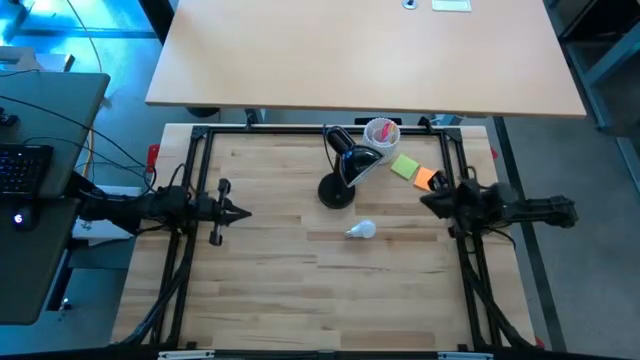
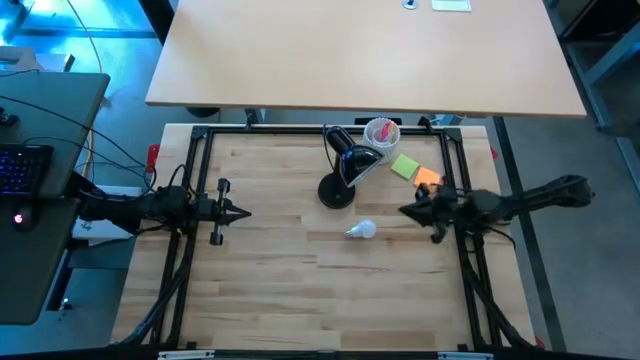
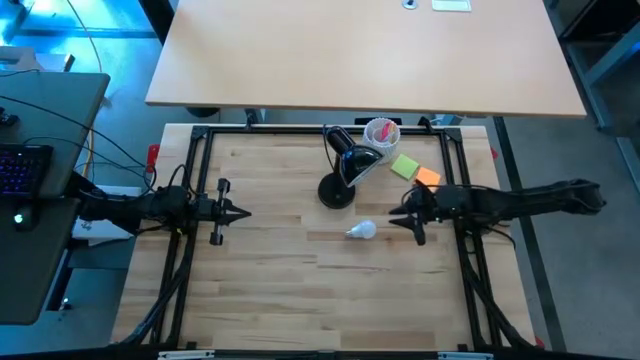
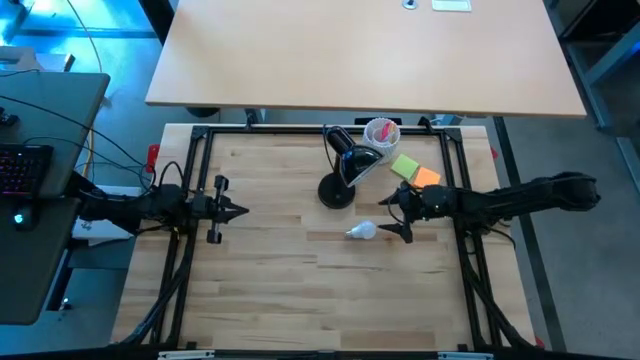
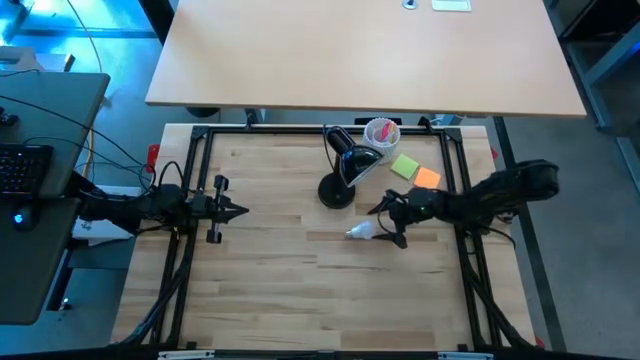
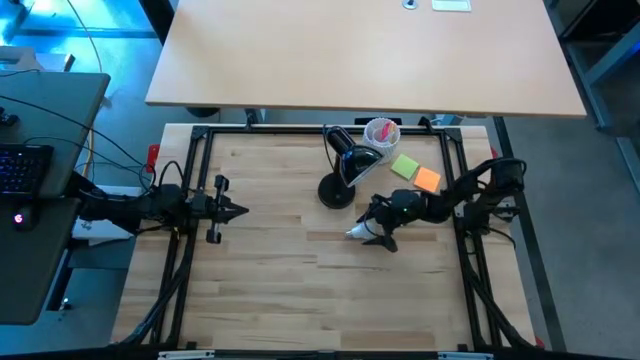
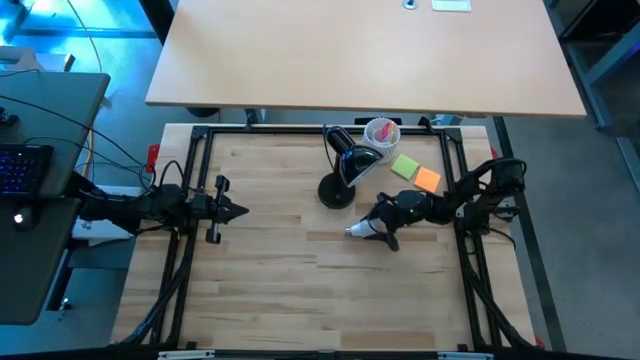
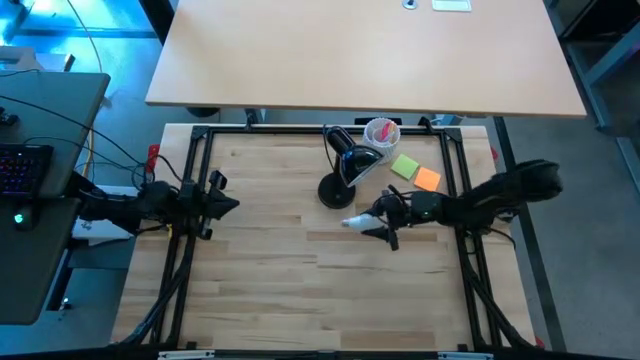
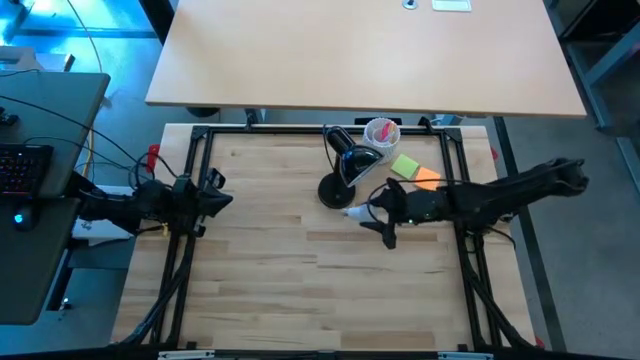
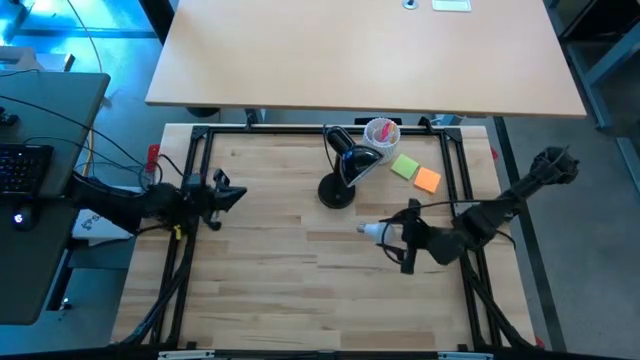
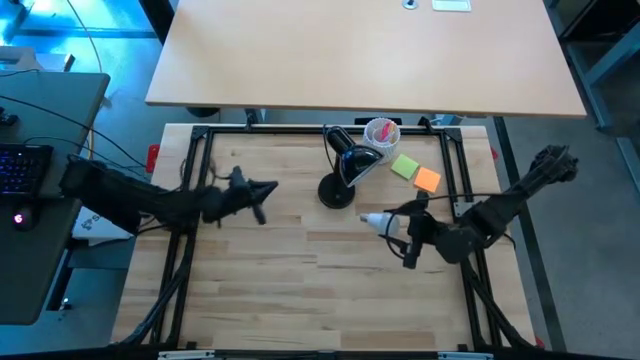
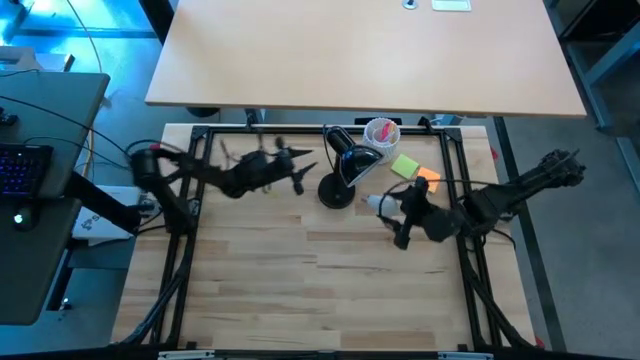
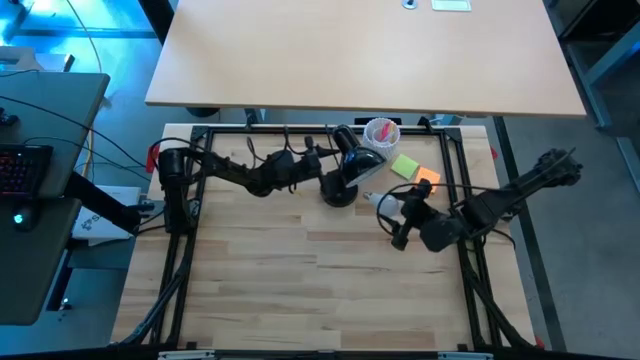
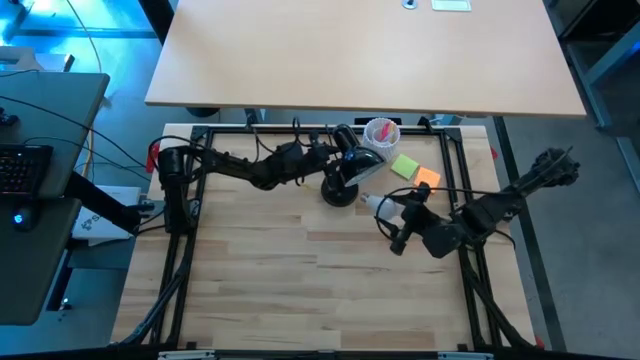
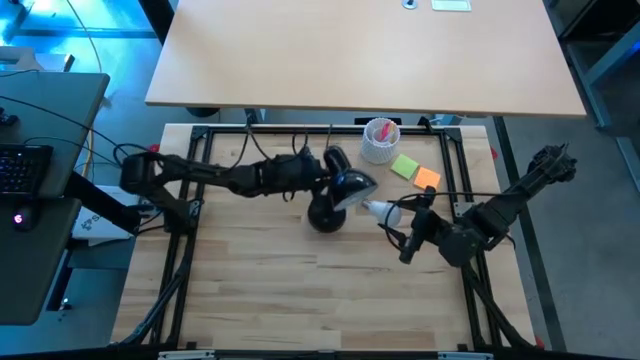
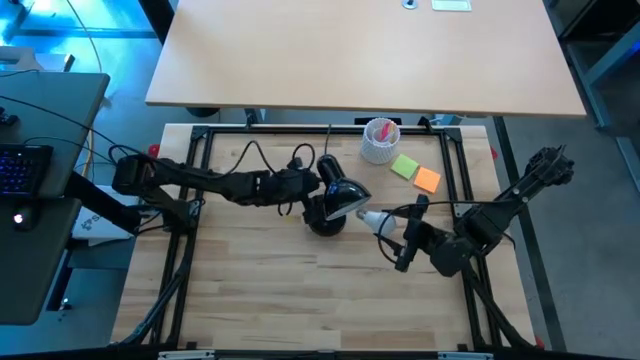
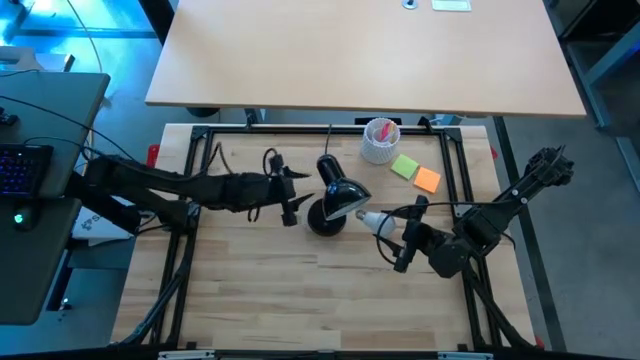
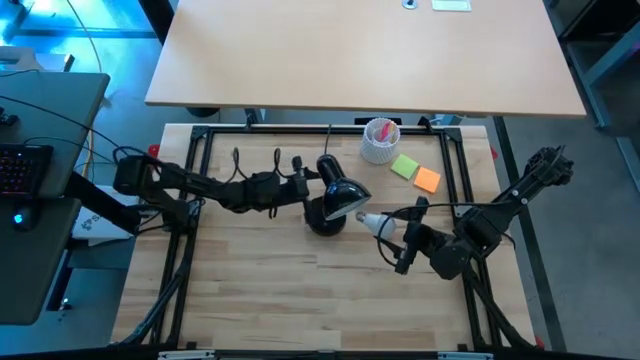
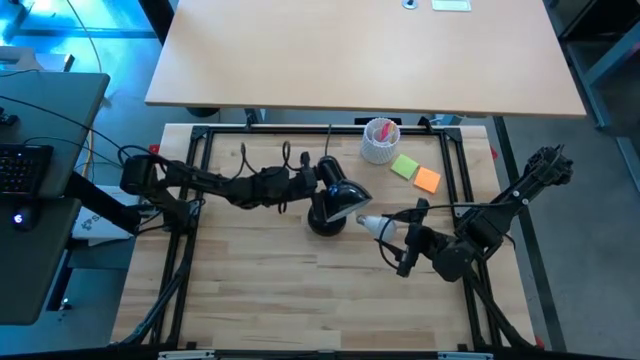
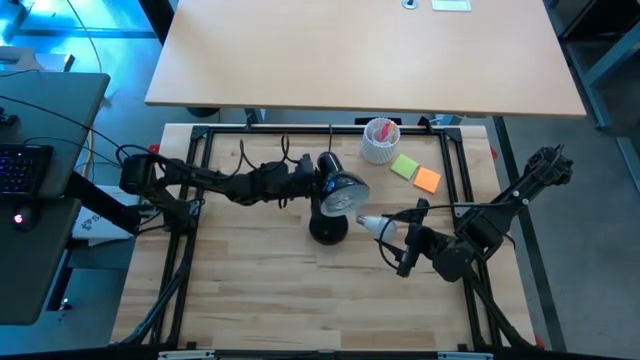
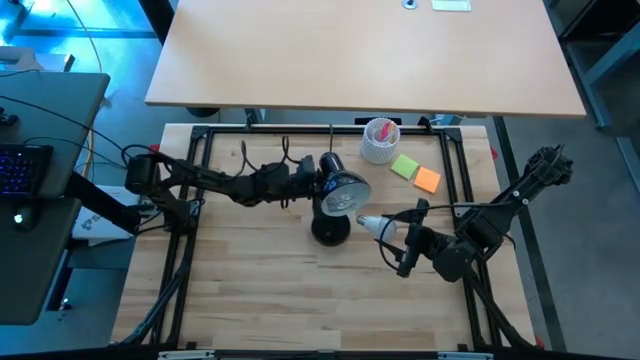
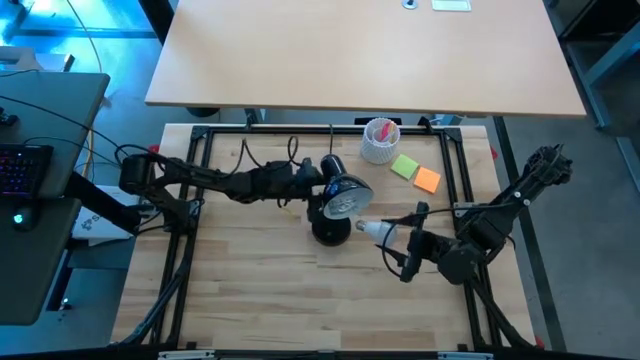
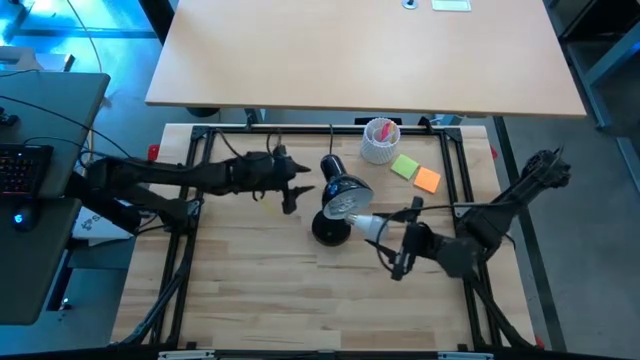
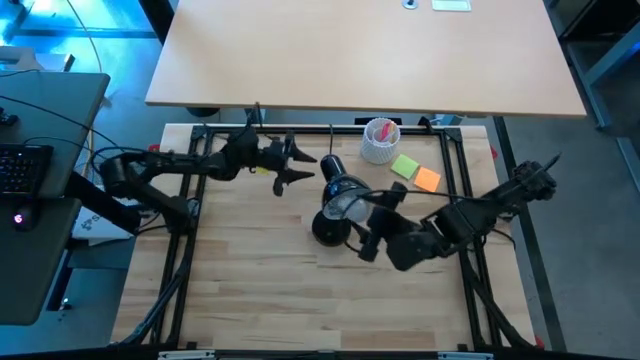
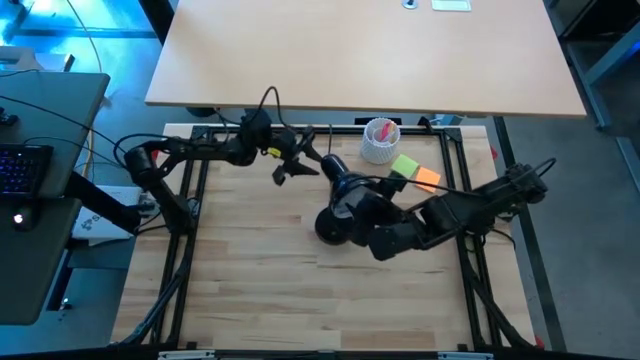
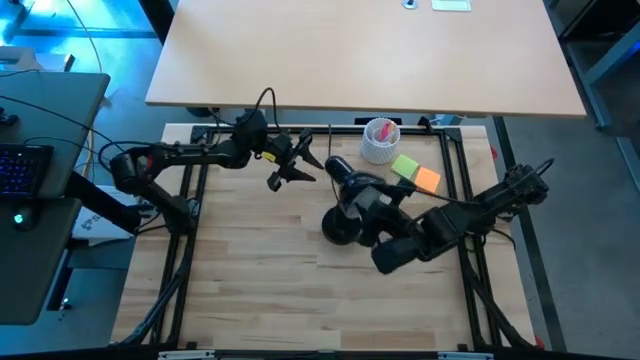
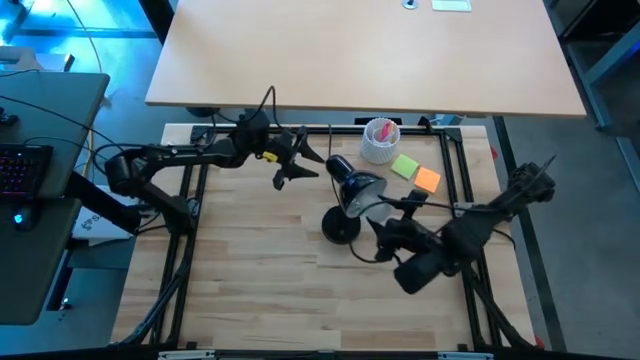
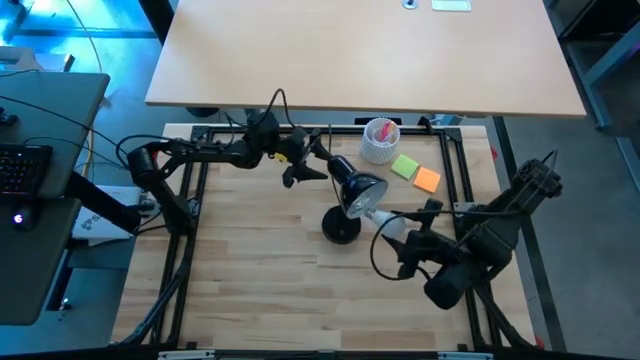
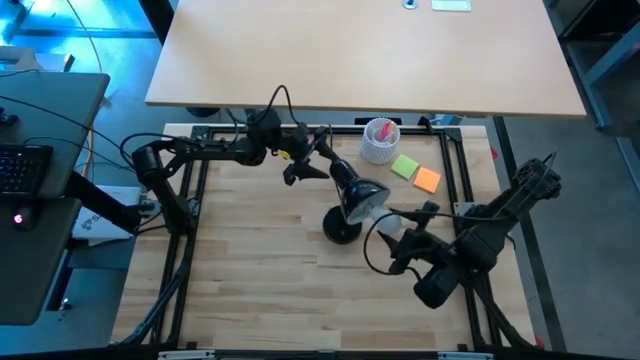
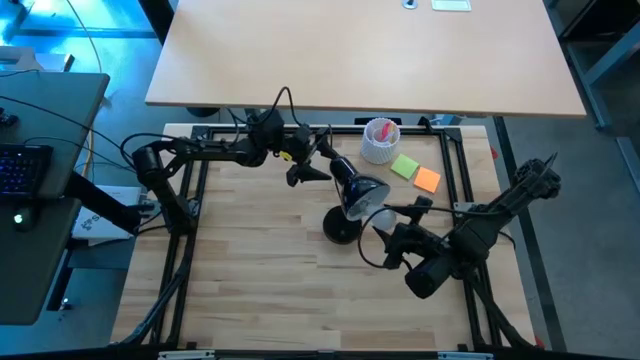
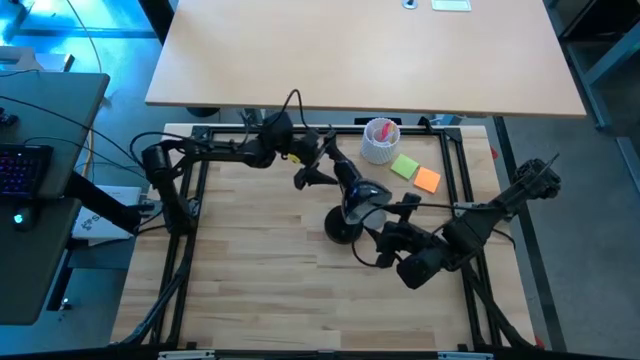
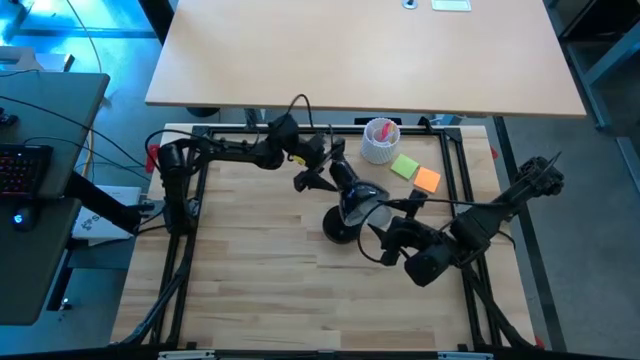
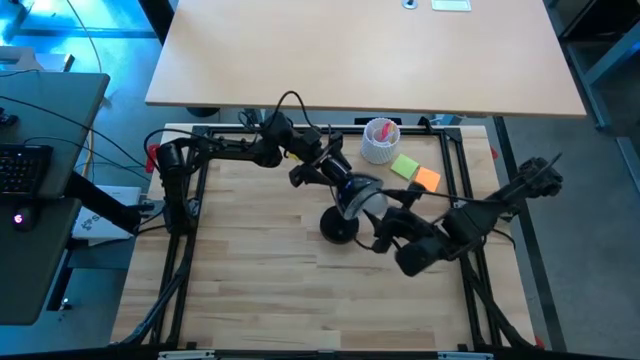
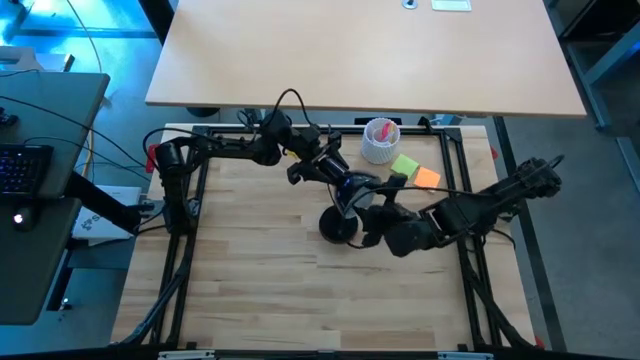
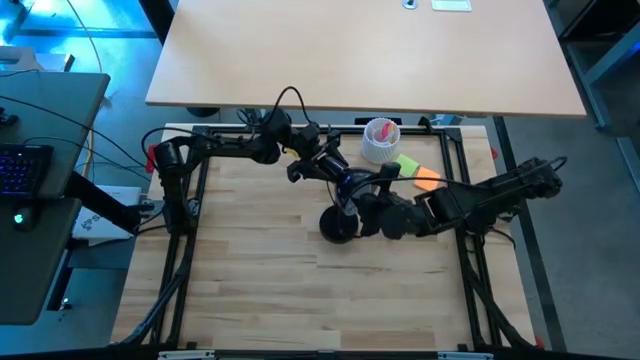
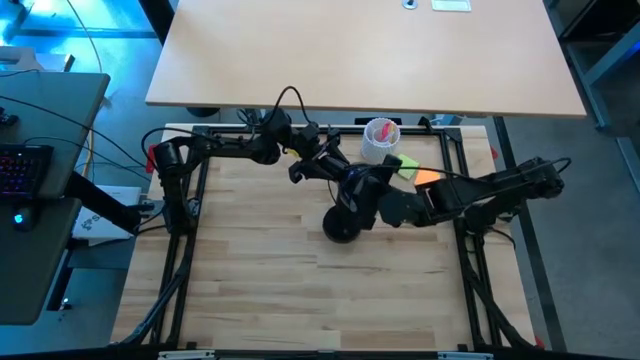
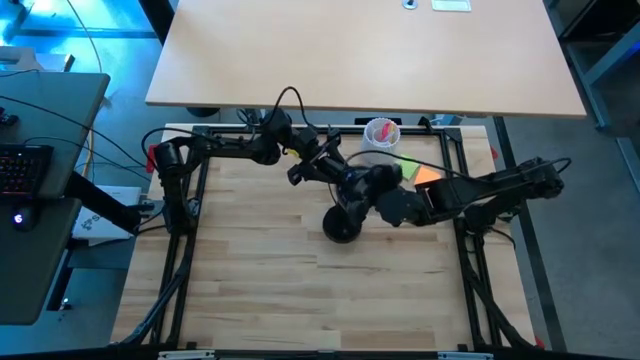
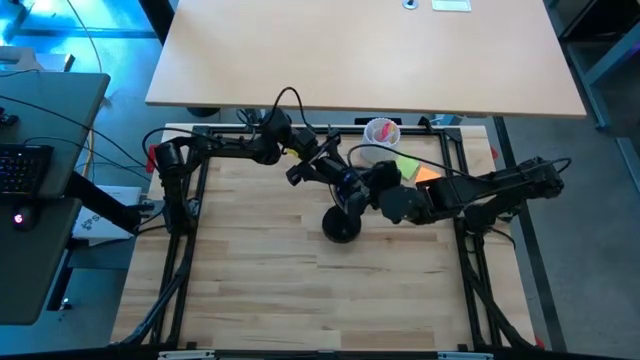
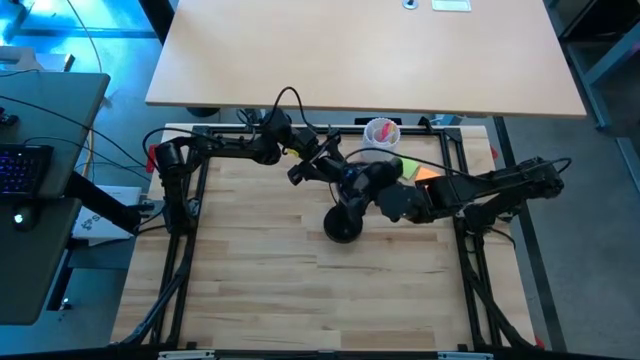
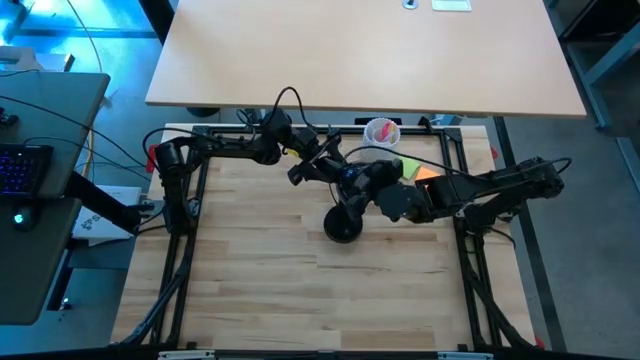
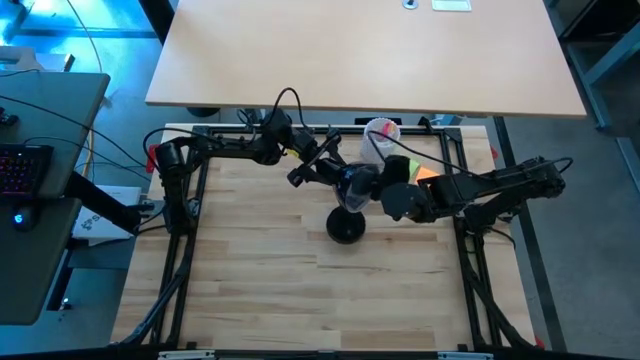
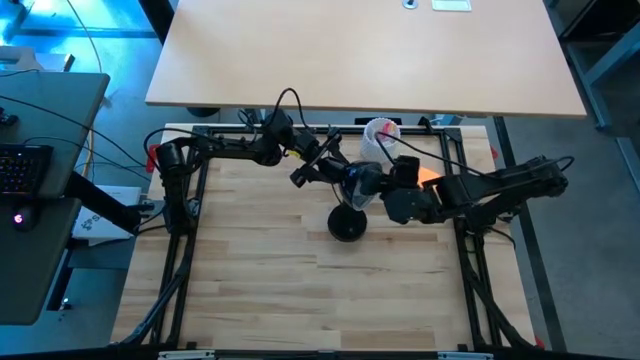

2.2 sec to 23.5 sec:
Task: Screw lightbulb
Insert the lightbulb into the desk lamp
